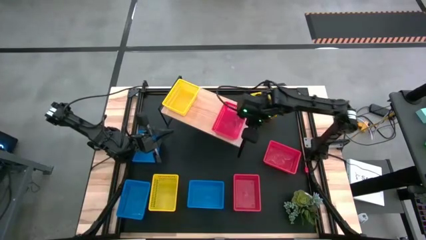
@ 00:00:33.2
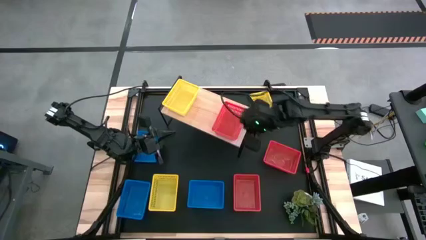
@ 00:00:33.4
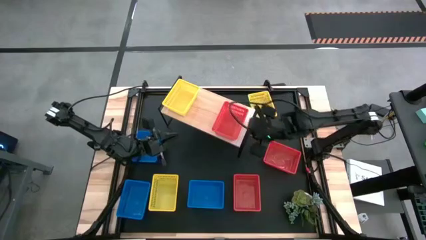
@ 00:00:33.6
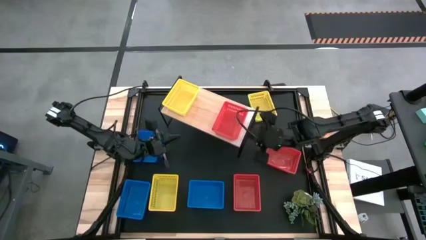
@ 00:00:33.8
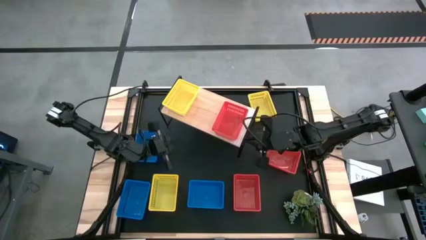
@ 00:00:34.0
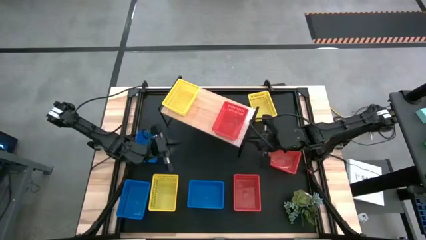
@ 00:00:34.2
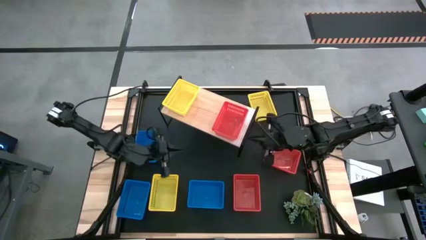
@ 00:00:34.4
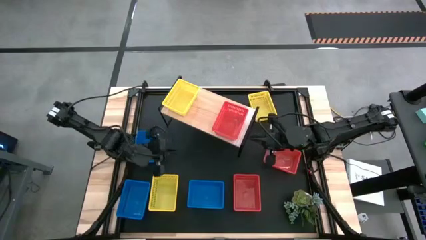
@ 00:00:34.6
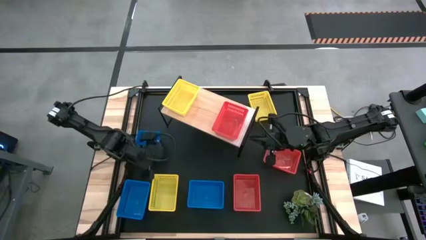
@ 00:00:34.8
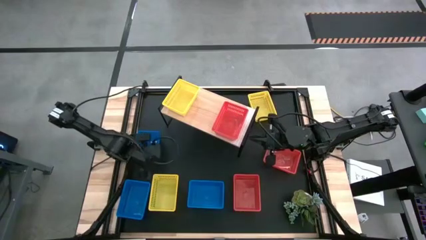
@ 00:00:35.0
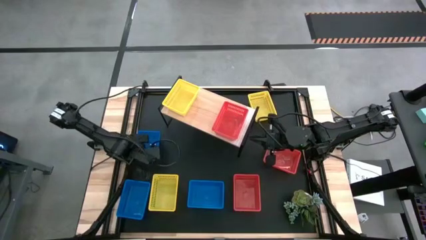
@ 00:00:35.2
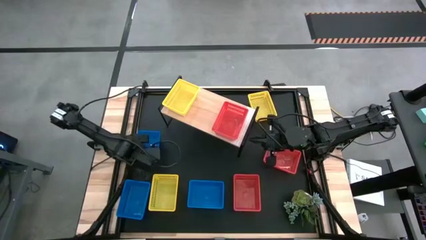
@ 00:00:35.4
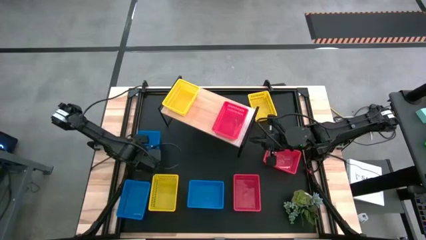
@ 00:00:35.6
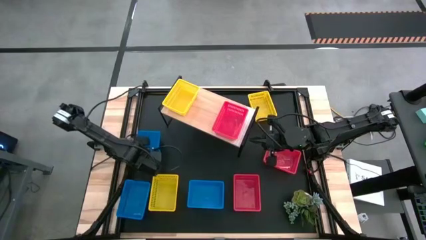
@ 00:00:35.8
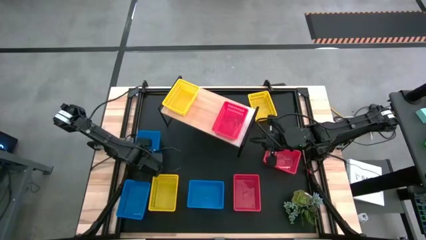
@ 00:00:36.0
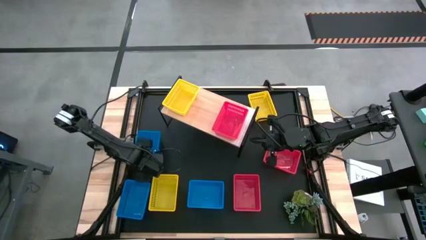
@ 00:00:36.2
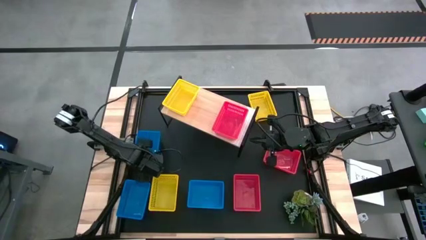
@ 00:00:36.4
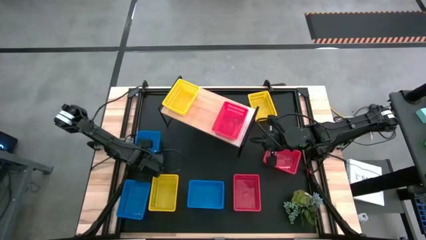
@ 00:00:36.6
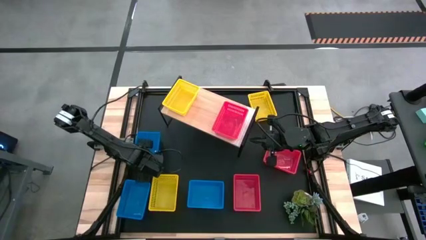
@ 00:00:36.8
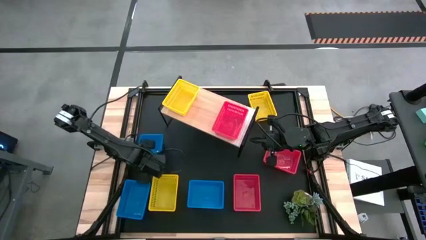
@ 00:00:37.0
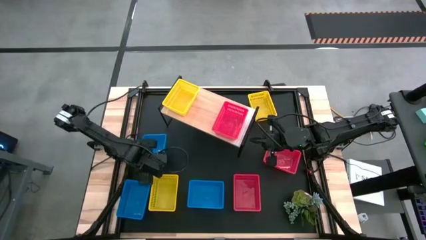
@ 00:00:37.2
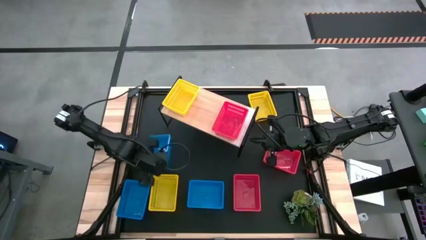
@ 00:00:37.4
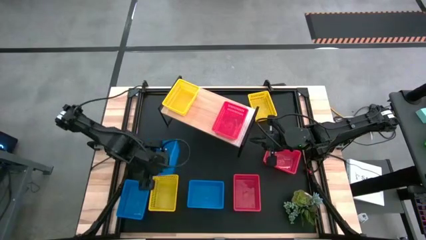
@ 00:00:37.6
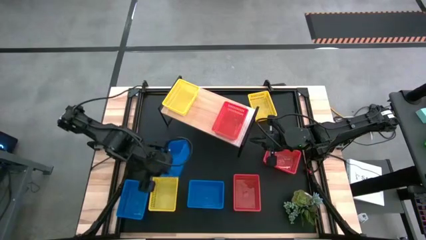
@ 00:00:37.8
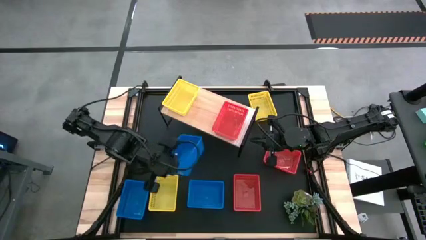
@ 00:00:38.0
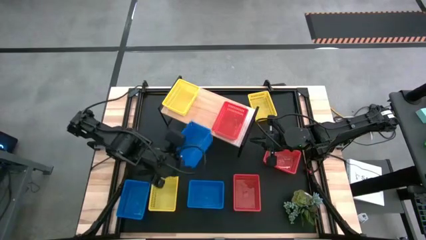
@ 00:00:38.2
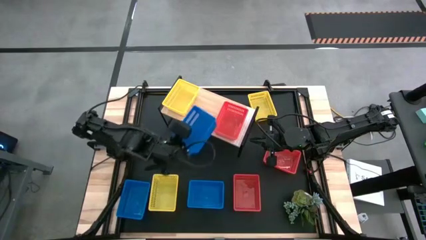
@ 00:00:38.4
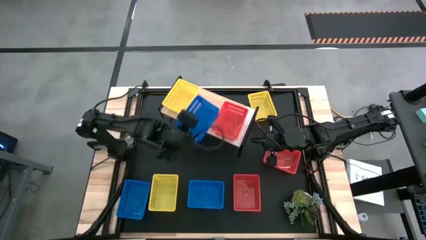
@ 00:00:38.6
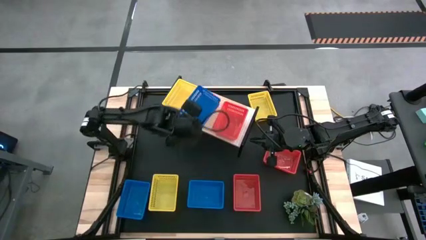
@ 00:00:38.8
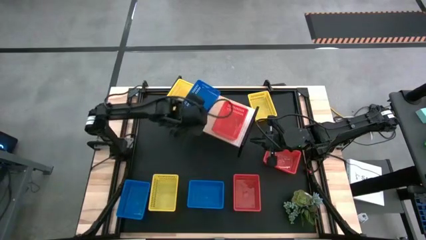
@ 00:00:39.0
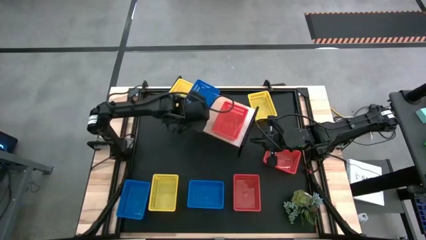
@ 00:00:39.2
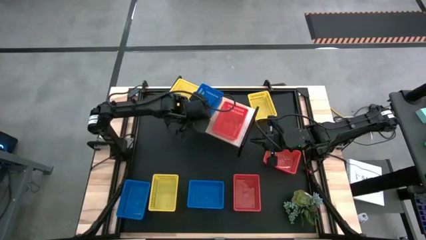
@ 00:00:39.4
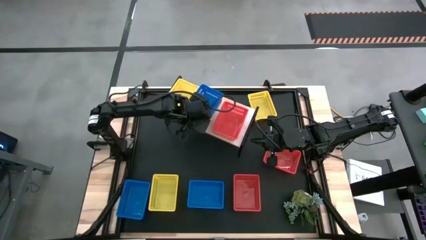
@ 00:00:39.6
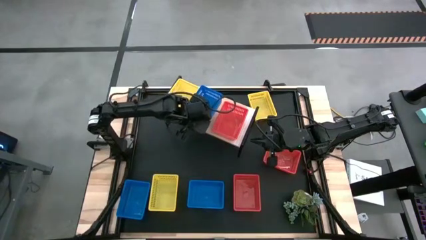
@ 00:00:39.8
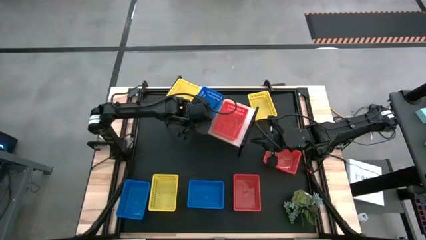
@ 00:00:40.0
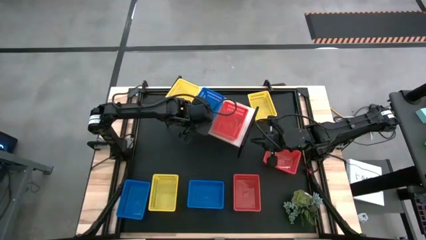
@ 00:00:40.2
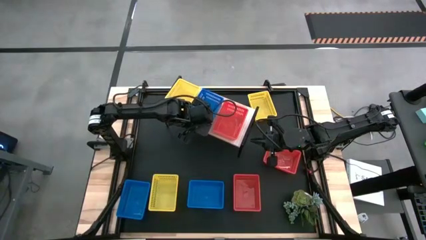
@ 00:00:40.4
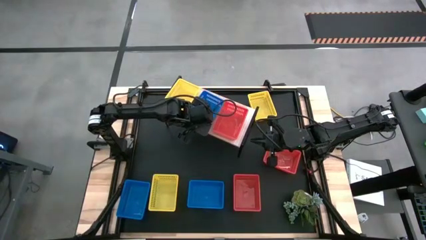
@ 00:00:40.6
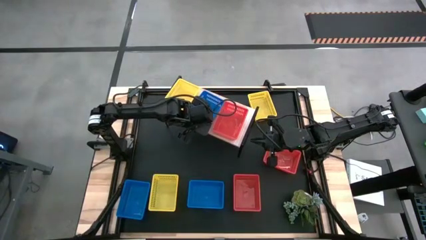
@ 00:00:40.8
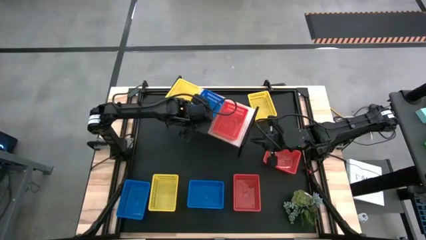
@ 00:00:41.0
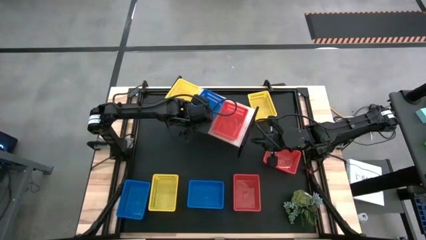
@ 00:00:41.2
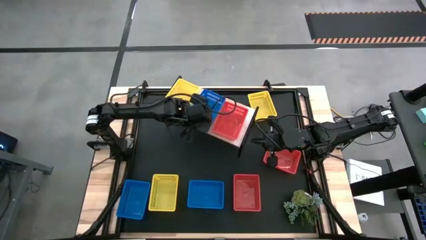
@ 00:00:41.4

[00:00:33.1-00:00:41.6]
Task: Stack baskets on shelf by color
Put the top blue bin on the shelf

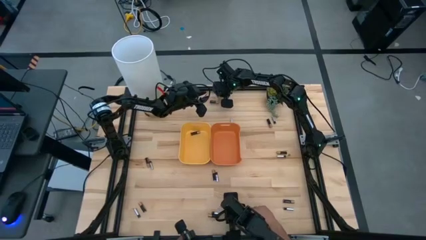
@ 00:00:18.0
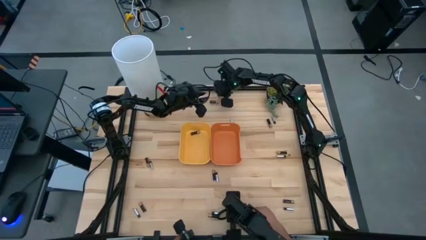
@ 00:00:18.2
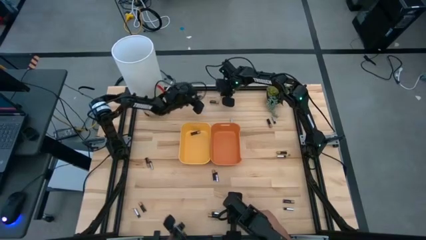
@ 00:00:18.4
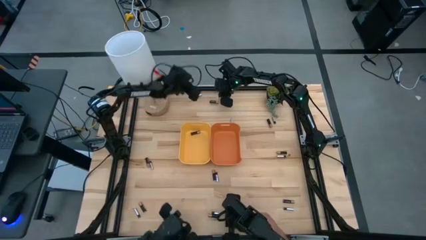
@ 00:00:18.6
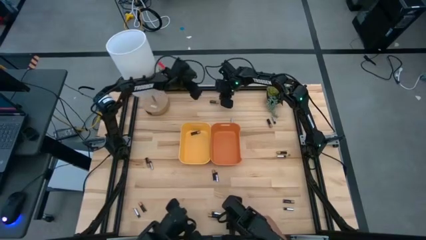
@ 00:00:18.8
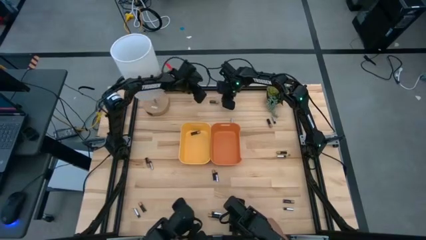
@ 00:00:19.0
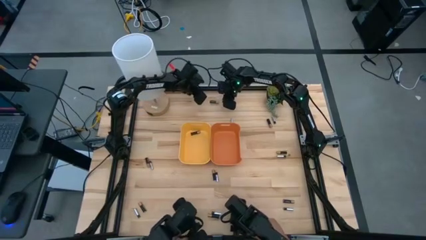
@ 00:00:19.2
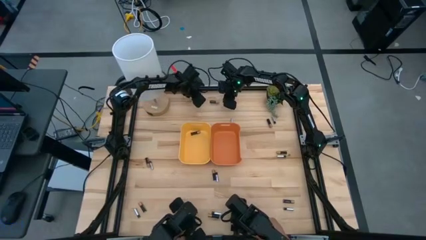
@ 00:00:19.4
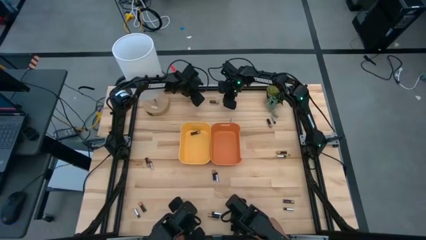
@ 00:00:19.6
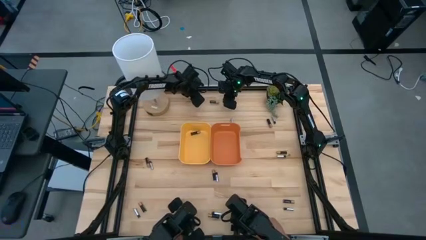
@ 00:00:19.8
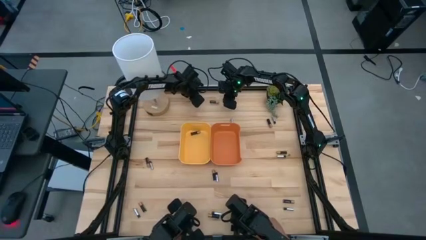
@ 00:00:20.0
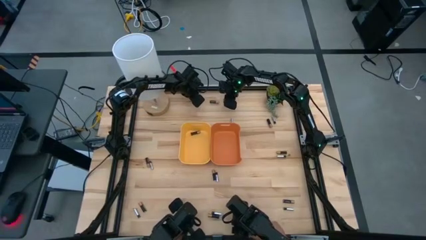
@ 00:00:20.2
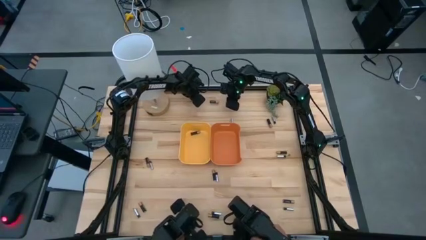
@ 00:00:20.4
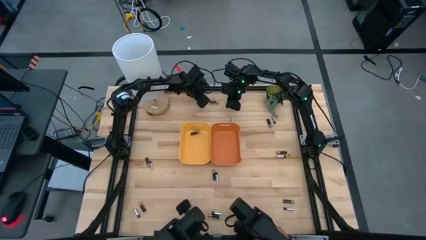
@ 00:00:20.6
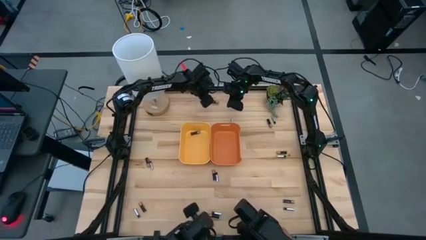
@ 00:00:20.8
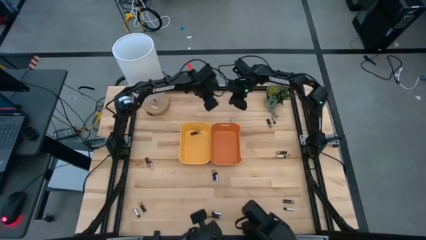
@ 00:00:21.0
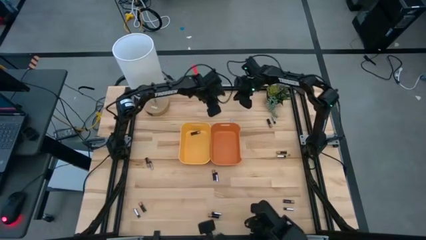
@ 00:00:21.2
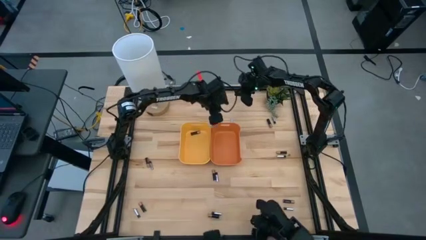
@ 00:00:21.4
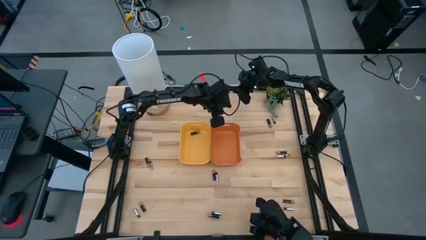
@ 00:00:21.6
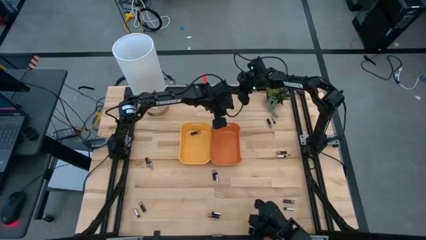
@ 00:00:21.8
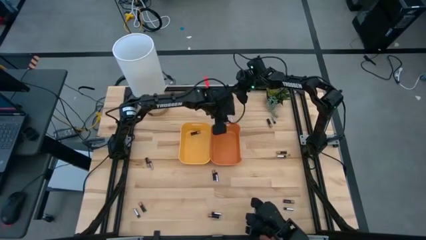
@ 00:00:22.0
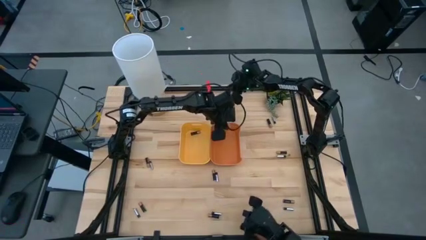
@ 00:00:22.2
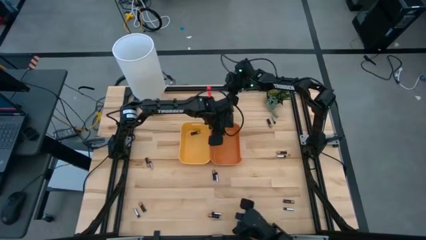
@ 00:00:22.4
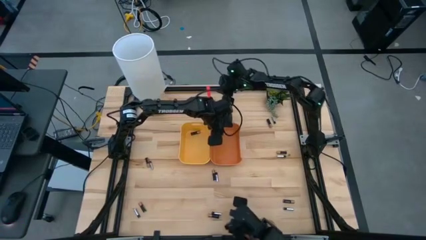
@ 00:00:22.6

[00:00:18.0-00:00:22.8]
Task: Sort batteries
Put the top center silver battery into the orange bin
